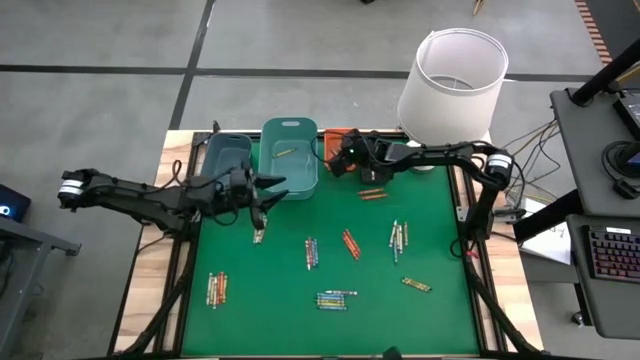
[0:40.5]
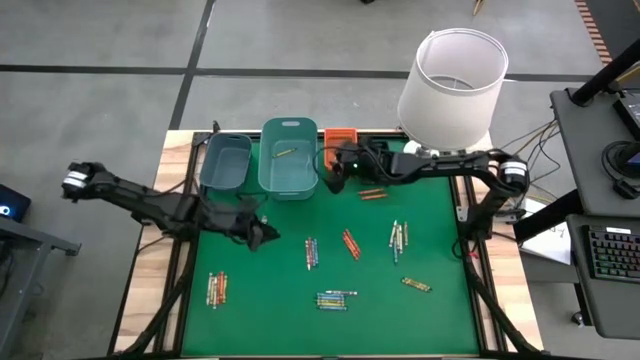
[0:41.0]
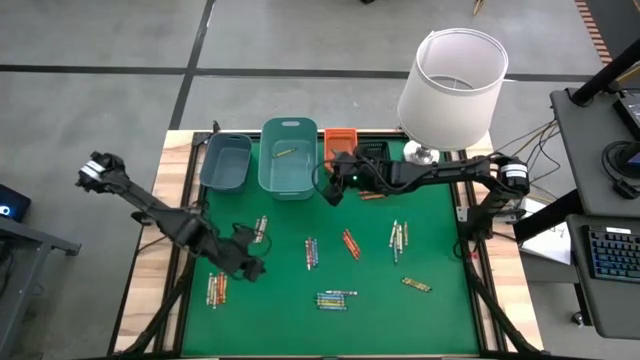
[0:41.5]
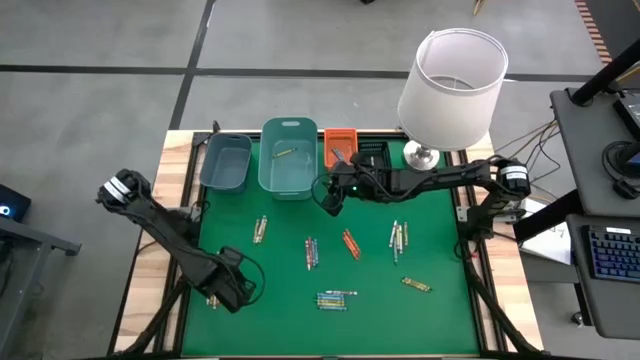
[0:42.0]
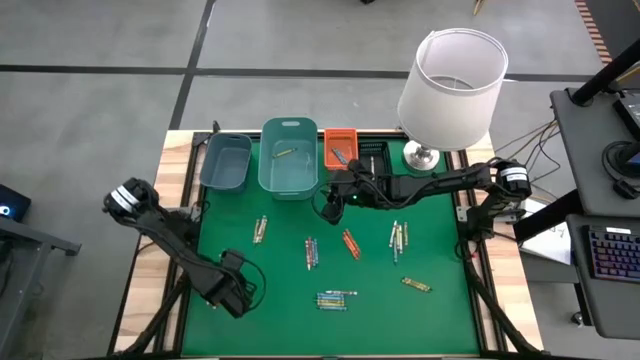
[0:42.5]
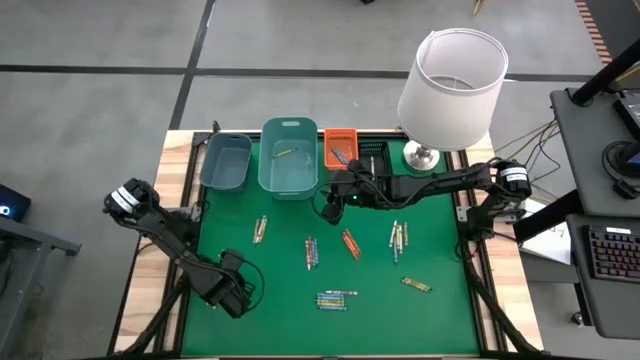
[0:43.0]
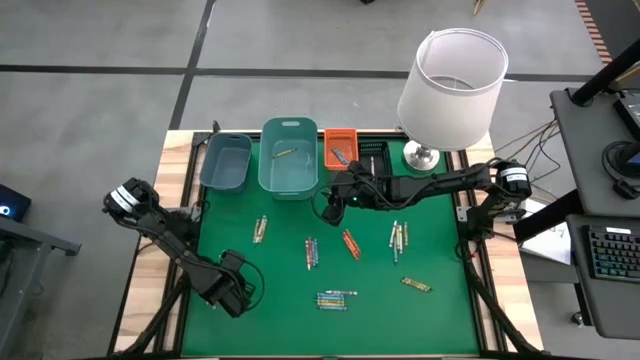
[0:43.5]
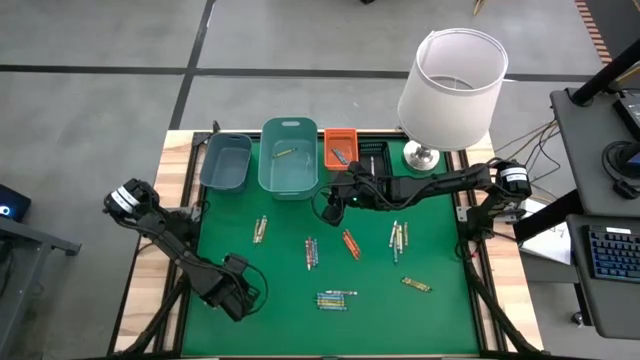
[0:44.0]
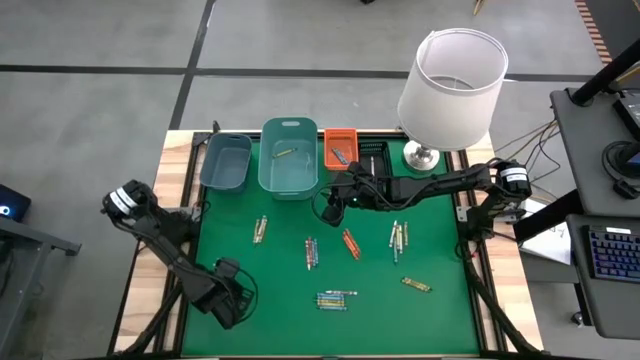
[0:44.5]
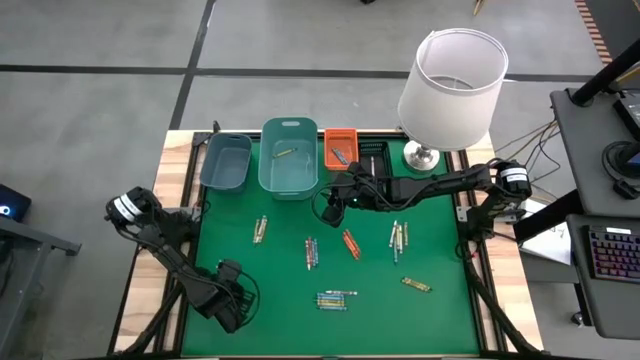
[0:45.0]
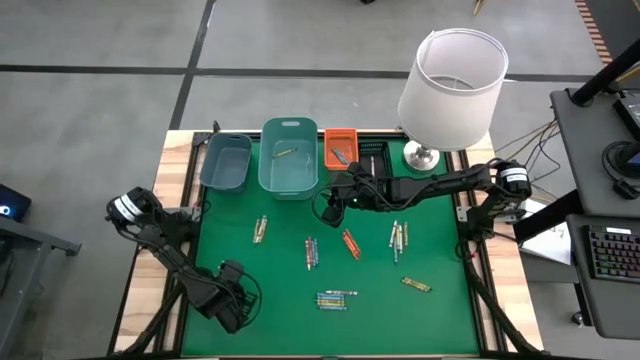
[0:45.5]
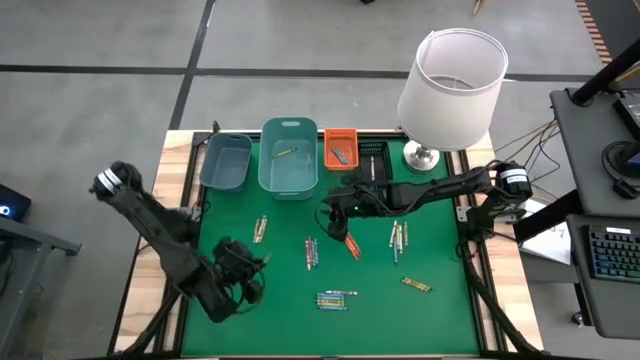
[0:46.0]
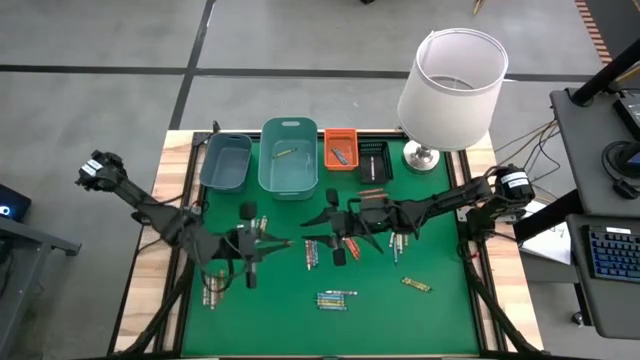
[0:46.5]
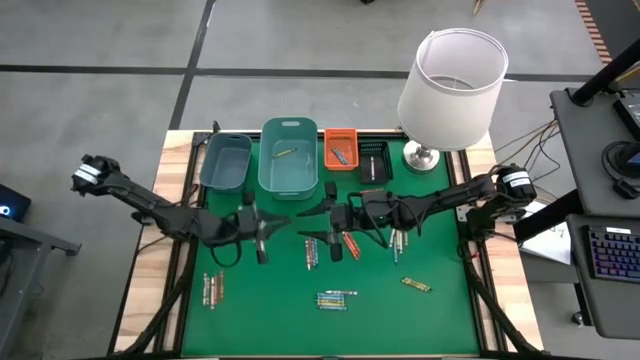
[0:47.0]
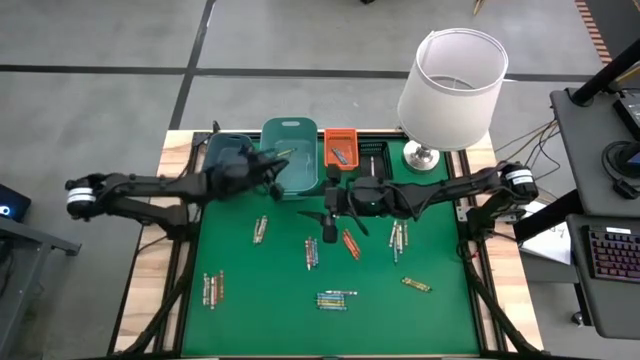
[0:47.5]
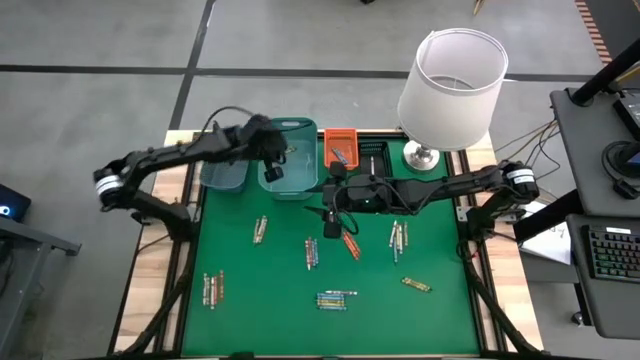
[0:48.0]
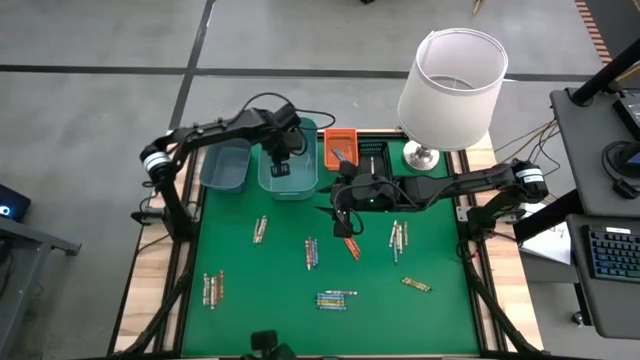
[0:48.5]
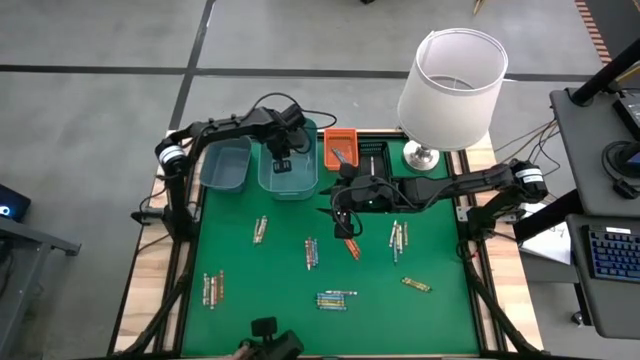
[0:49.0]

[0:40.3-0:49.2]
Task: Sort crayons
Put the green crayon into the green bin

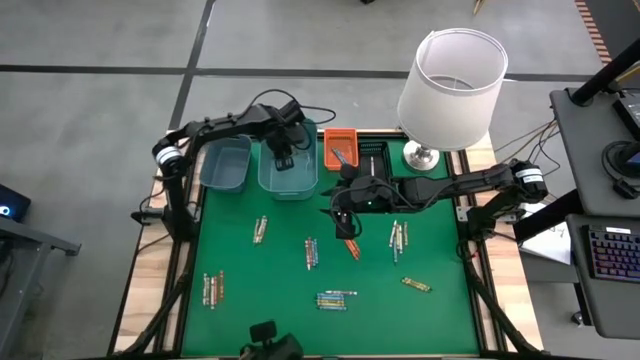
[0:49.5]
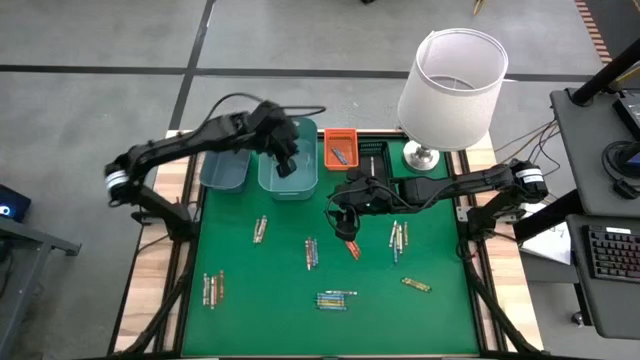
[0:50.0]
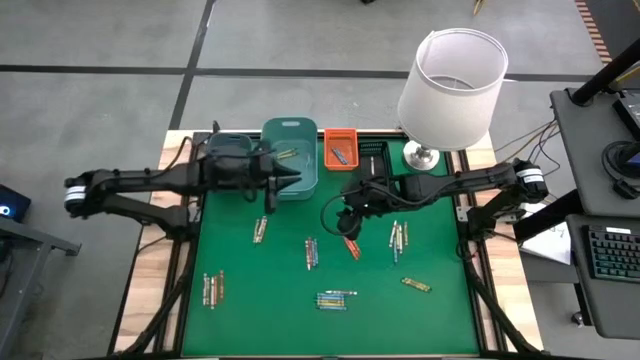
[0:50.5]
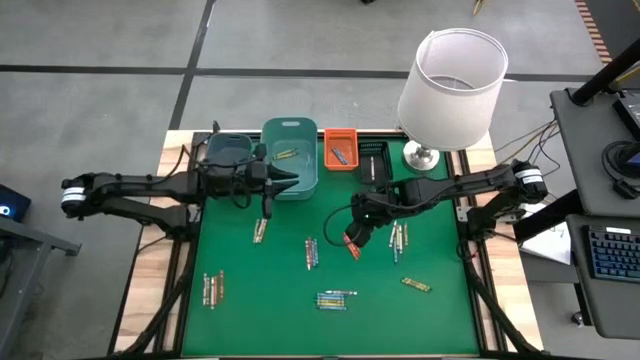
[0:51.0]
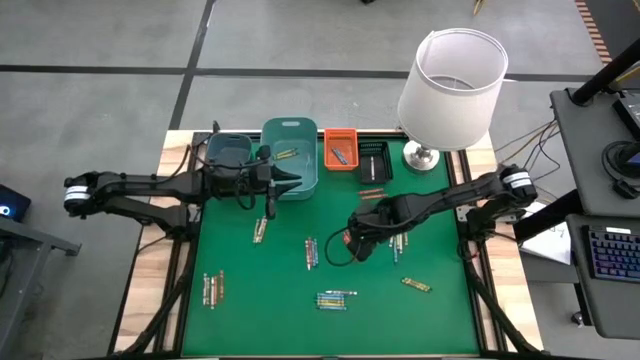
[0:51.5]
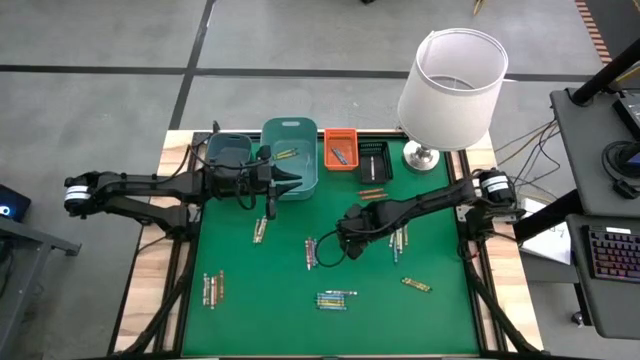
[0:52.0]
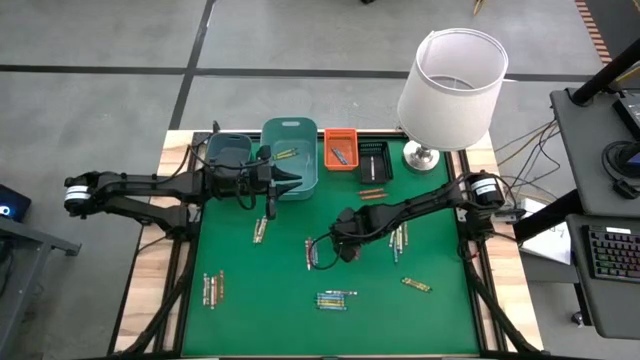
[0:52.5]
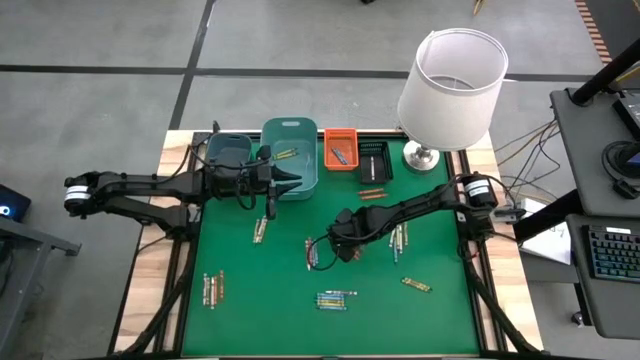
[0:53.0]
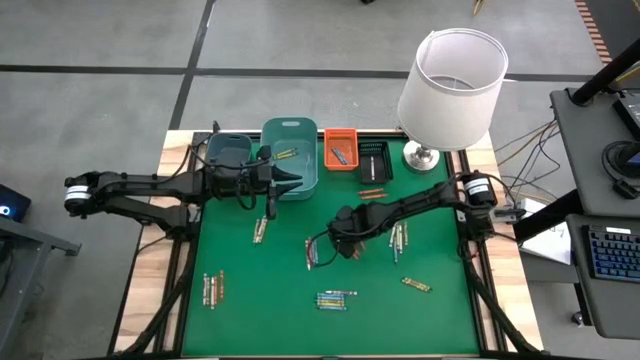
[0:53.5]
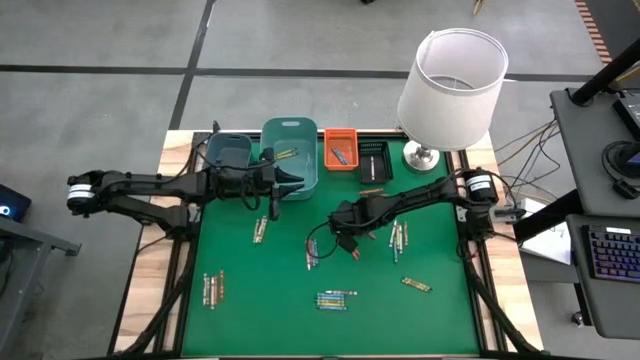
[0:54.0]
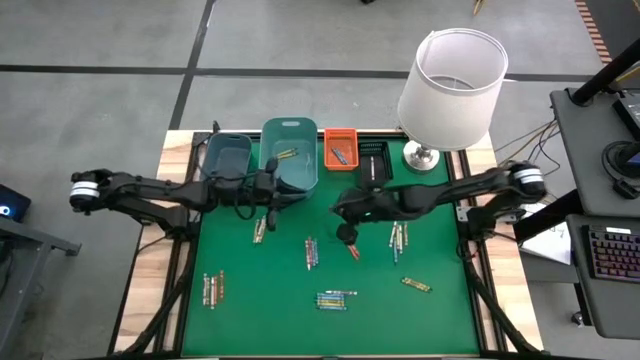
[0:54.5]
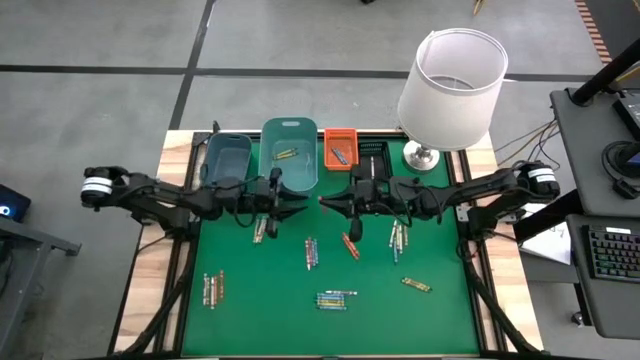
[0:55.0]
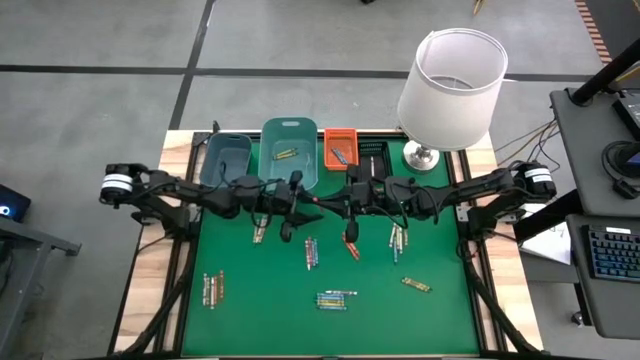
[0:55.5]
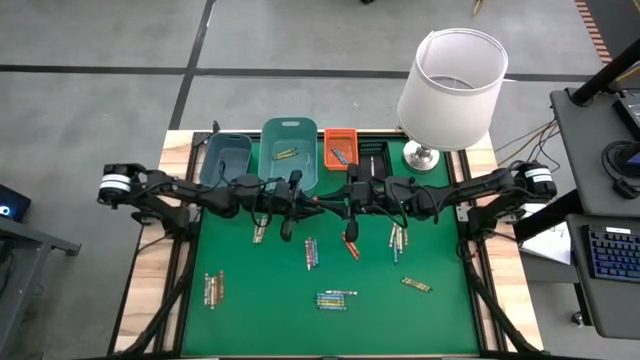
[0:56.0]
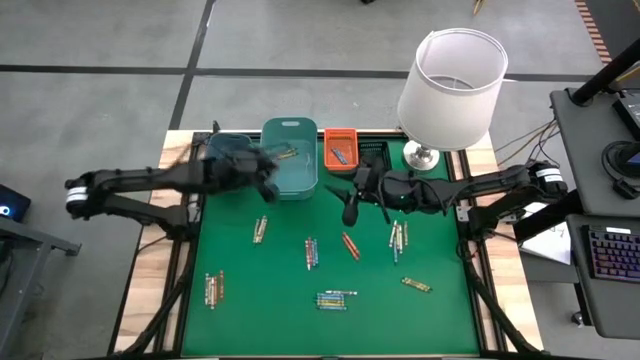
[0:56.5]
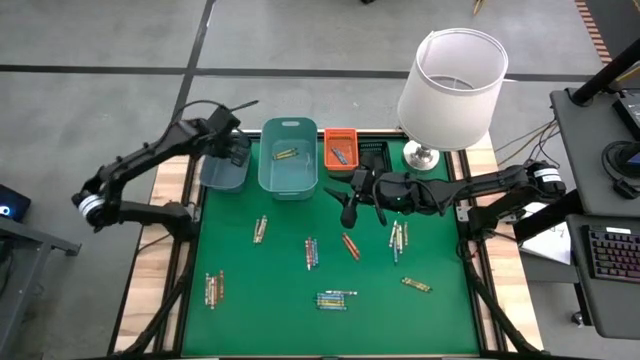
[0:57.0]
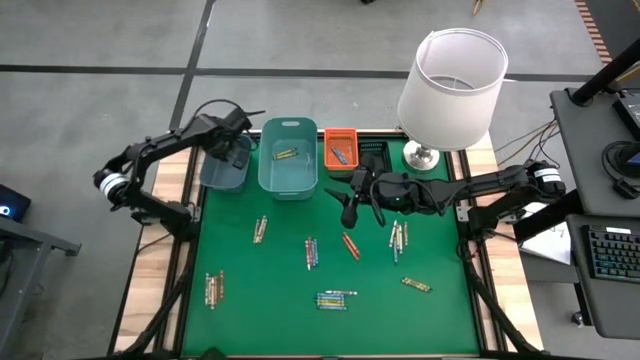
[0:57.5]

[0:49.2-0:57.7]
Put the orange crayon into the blue bin

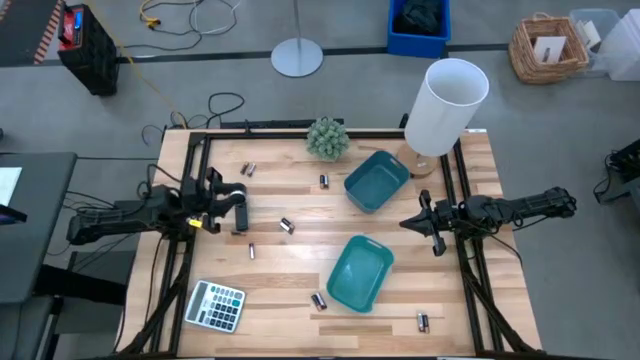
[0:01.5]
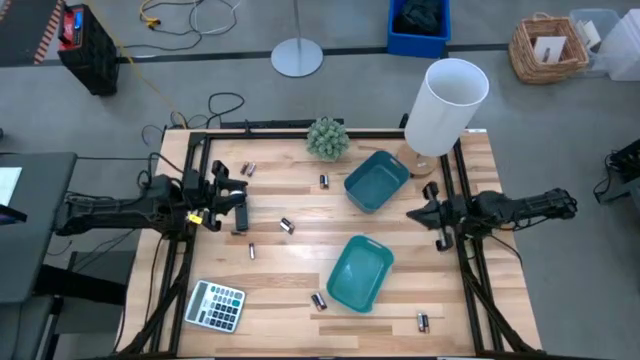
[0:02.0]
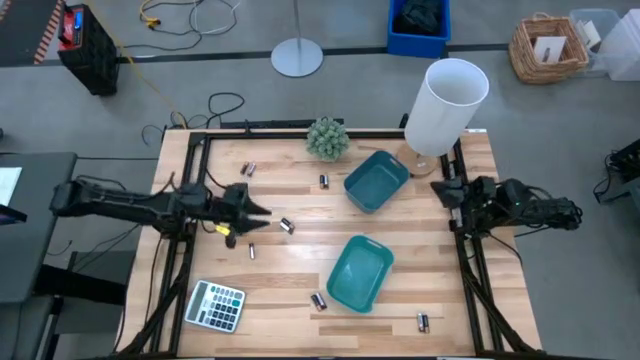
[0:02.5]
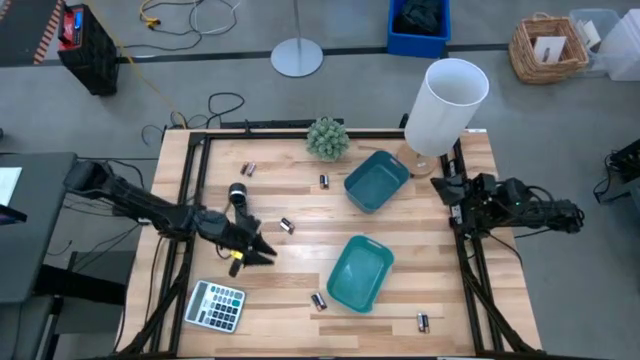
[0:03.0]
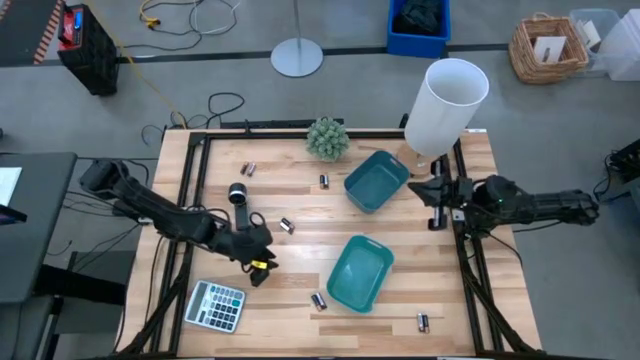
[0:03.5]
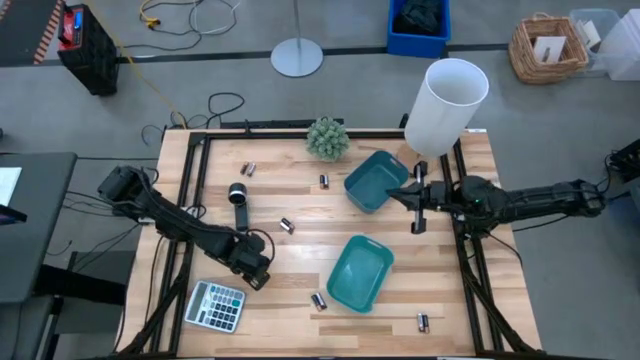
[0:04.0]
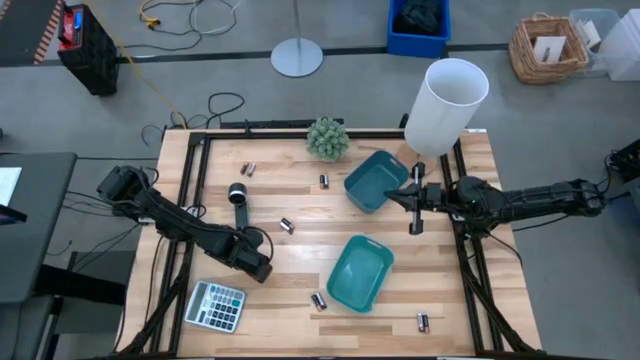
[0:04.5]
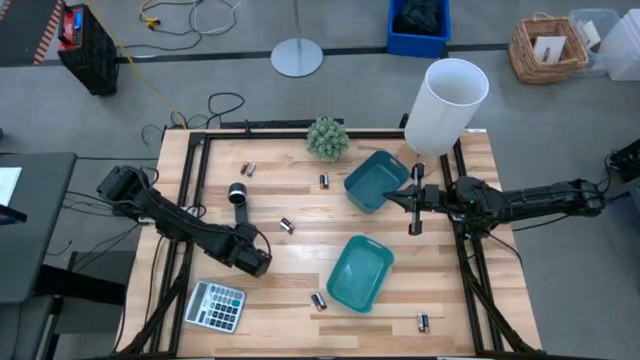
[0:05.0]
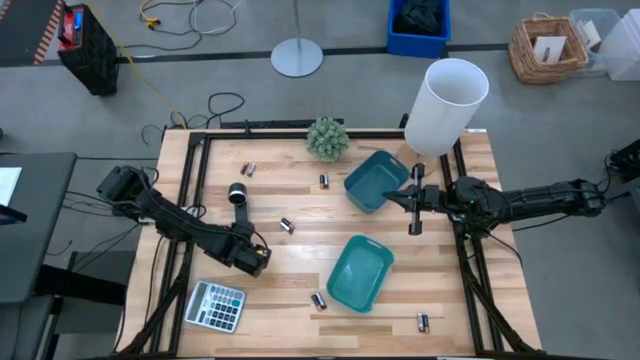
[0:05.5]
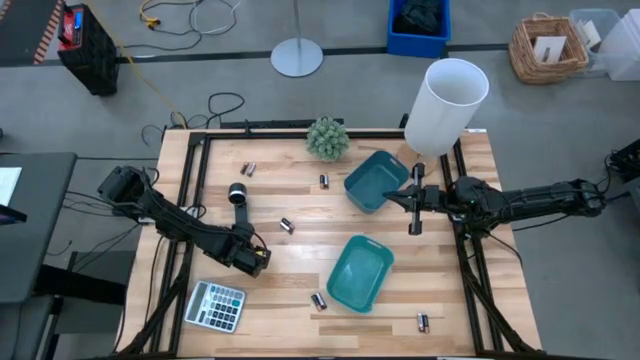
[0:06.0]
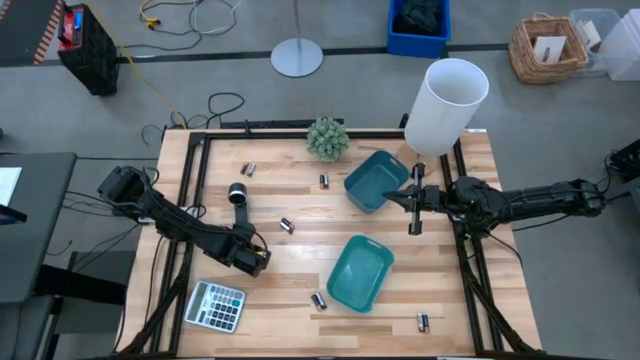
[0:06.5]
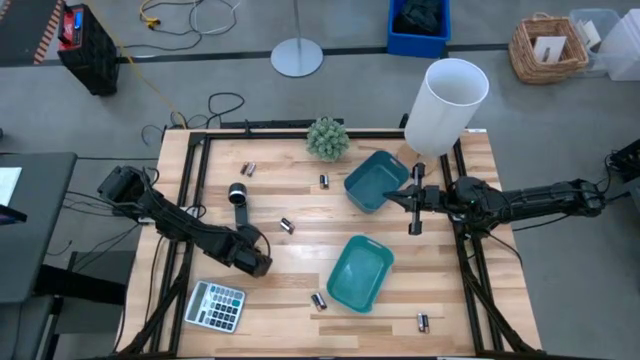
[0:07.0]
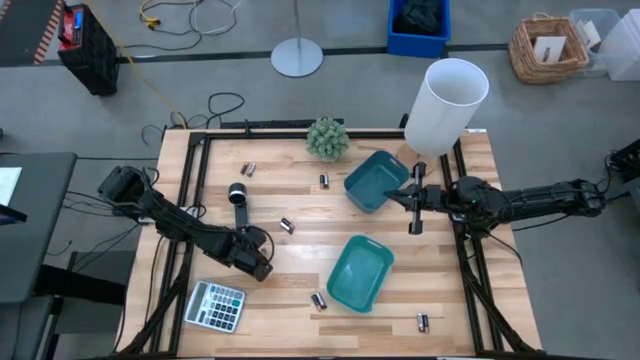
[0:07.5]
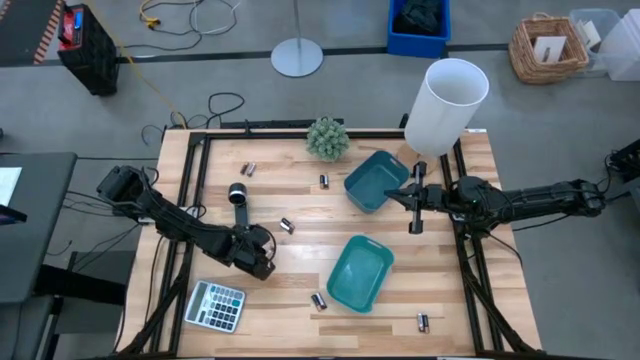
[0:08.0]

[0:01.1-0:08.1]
Task: Sort batteries
Put the silver battery into the green bin
